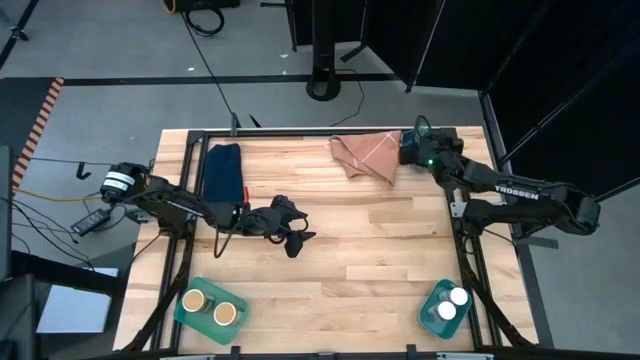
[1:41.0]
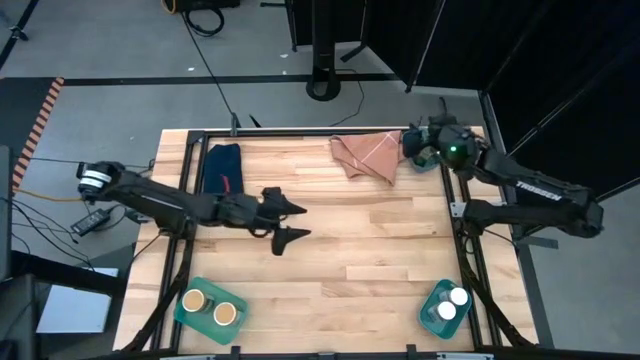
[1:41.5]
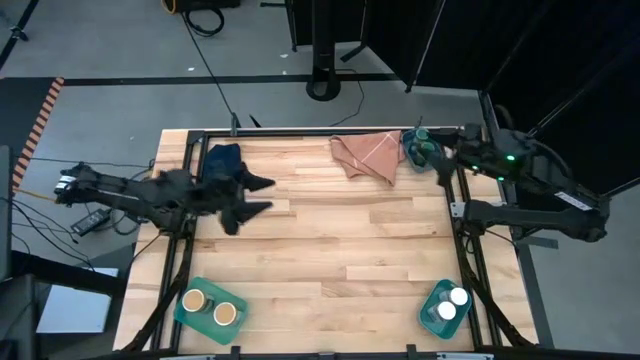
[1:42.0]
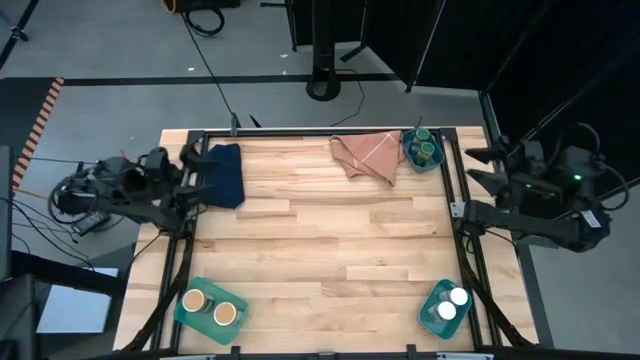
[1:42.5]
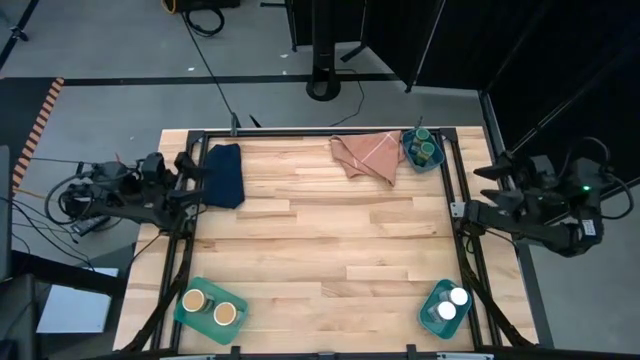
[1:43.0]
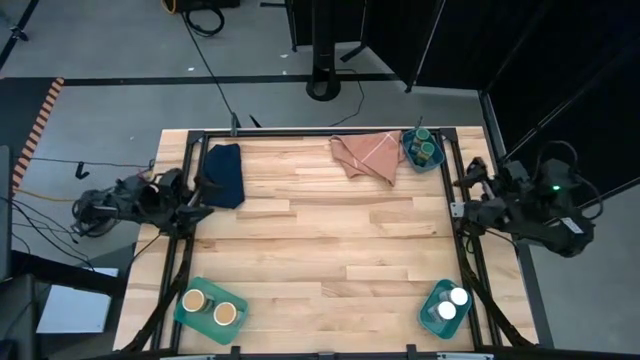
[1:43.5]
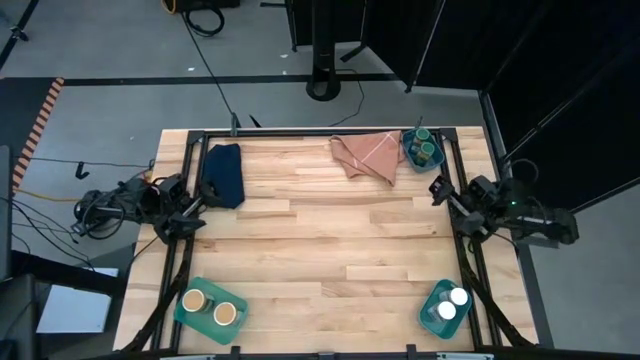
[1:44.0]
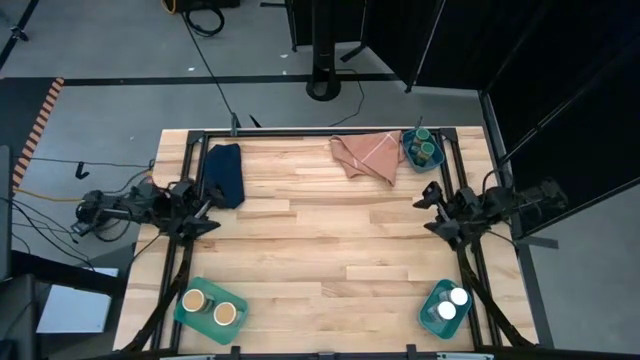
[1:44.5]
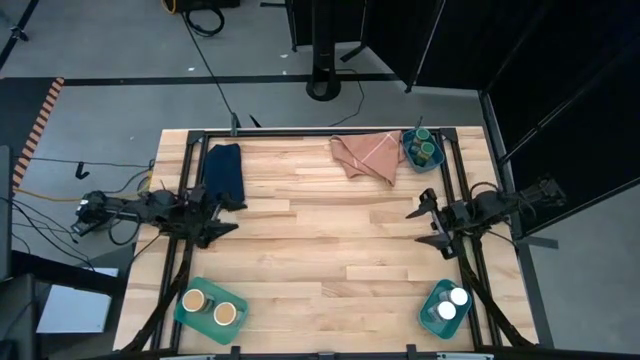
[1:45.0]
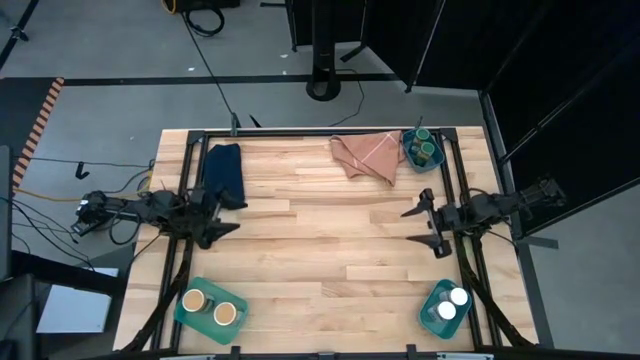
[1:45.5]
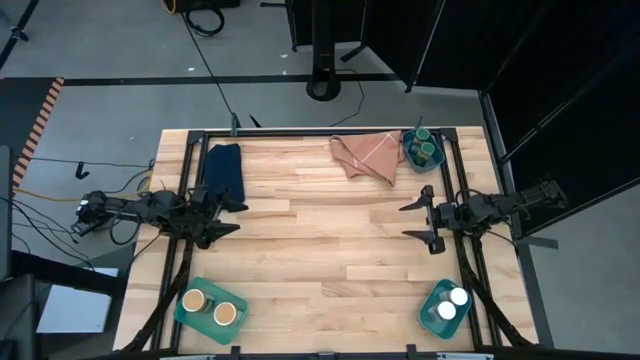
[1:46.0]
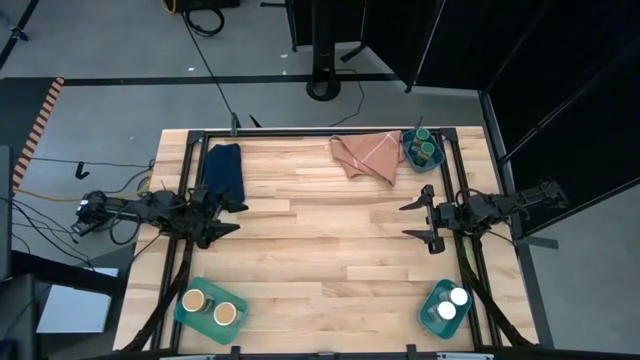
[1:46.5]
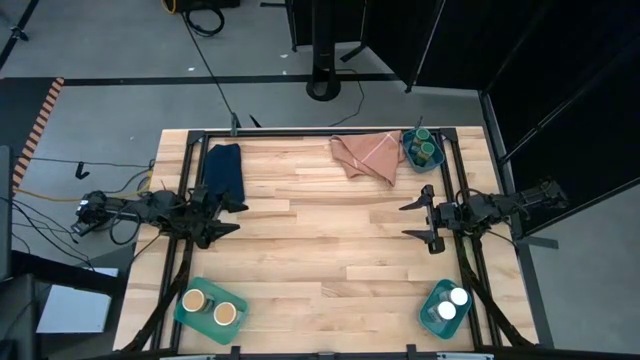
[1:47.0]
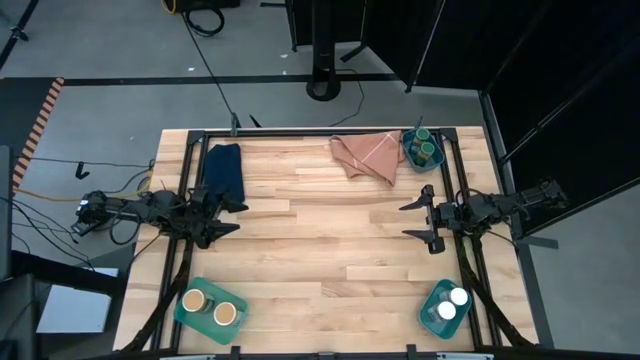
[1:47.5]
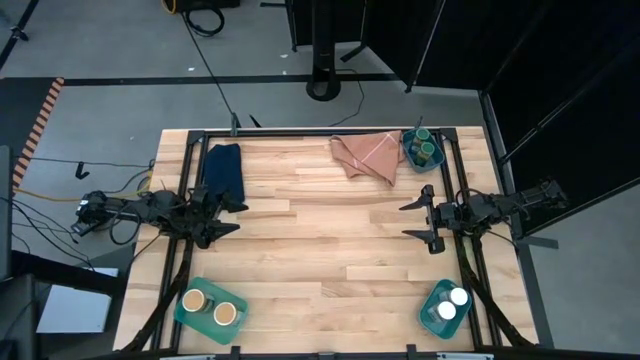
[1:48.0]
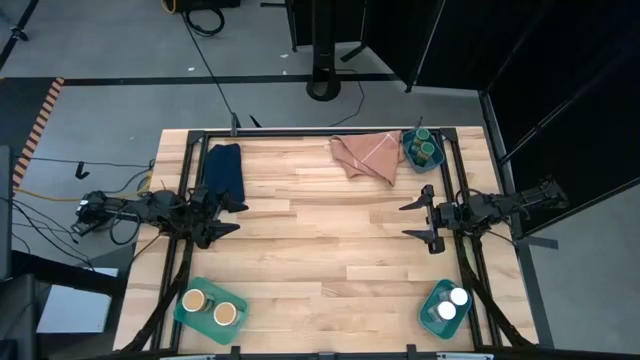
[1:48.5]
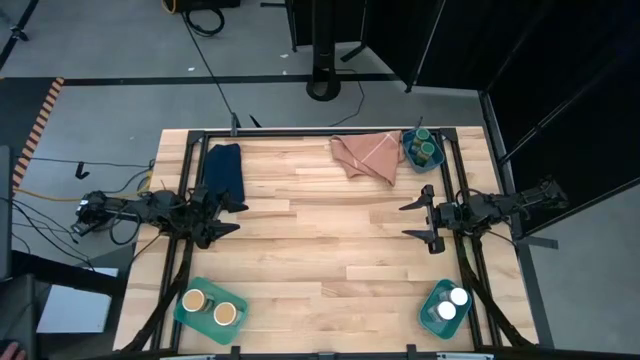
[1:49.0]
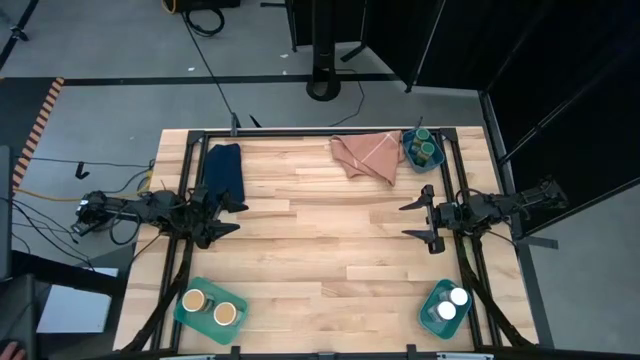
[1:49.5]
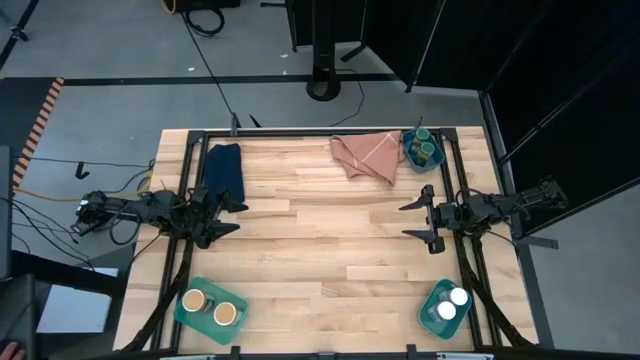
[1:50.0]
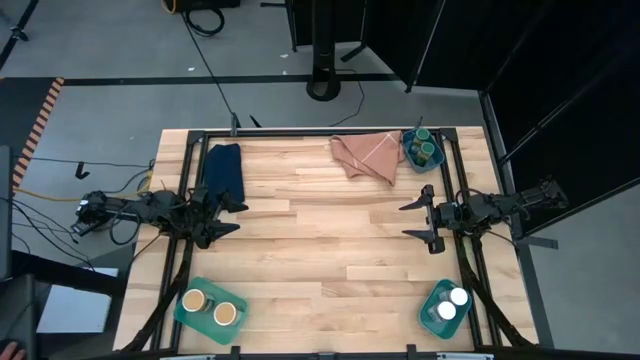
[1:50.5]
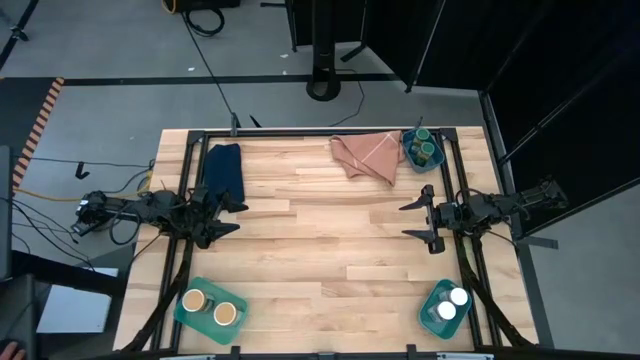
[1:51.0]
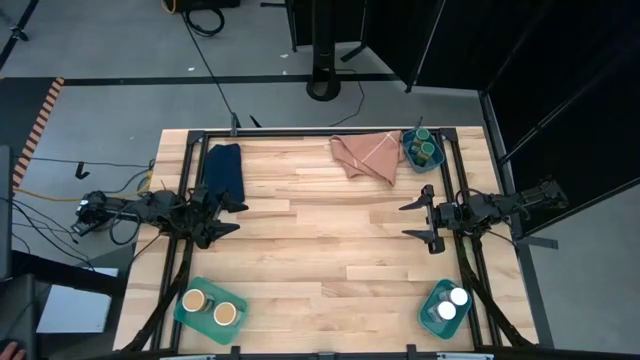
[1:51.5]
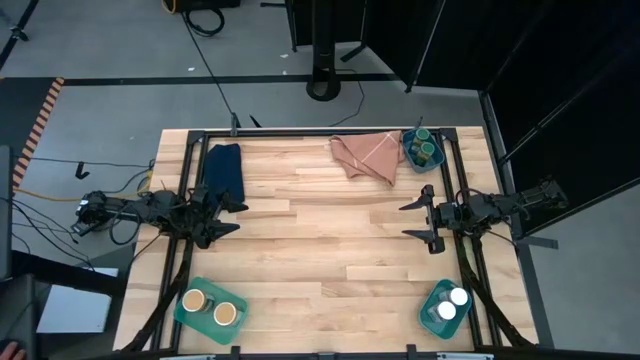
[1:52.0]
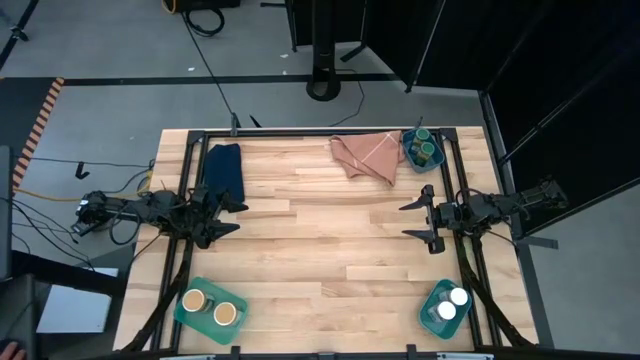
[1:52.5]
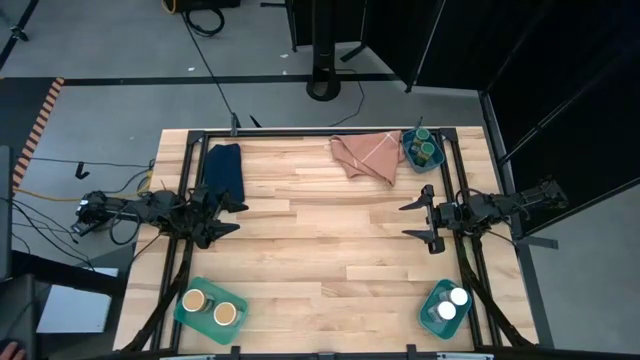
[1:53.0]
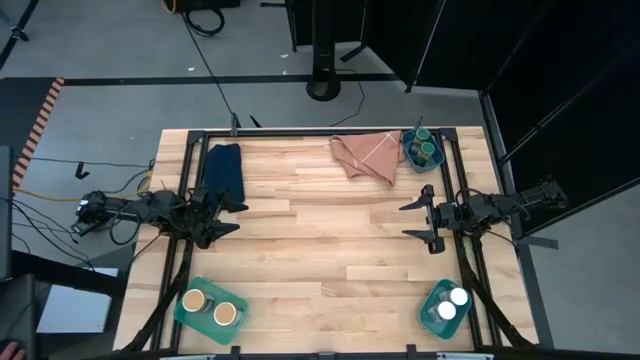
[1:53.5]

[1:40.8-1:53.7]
Task: Sort spices by type
Return to Home Position

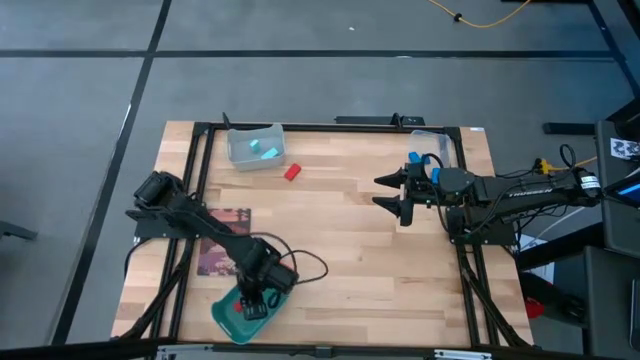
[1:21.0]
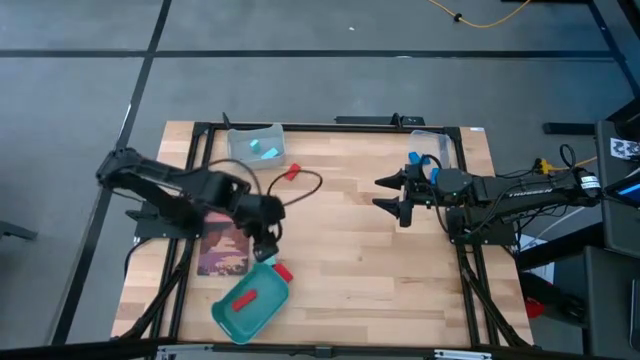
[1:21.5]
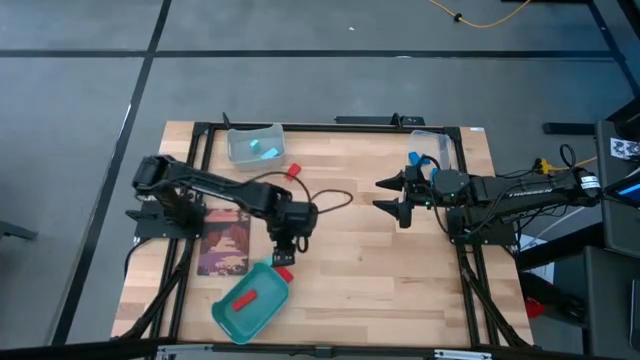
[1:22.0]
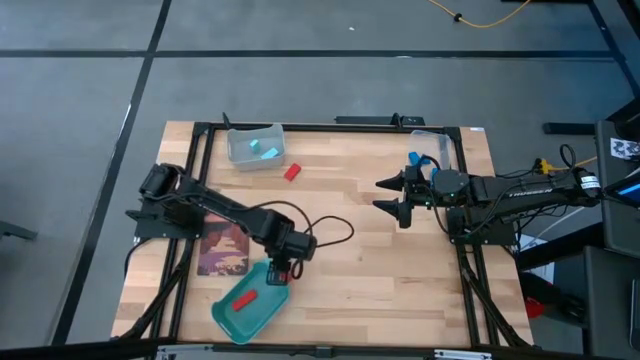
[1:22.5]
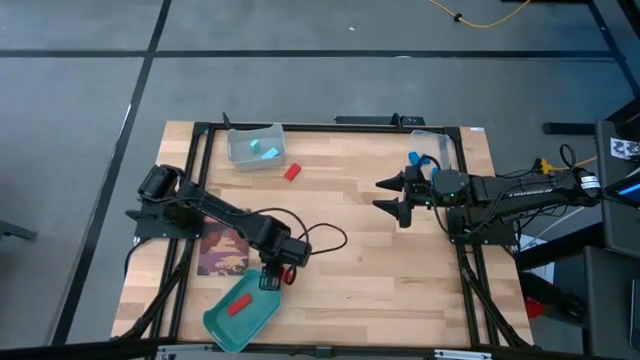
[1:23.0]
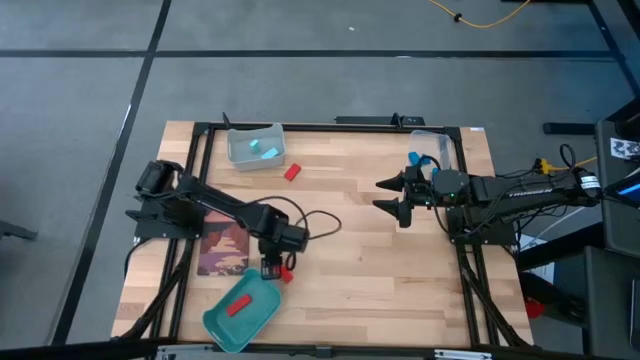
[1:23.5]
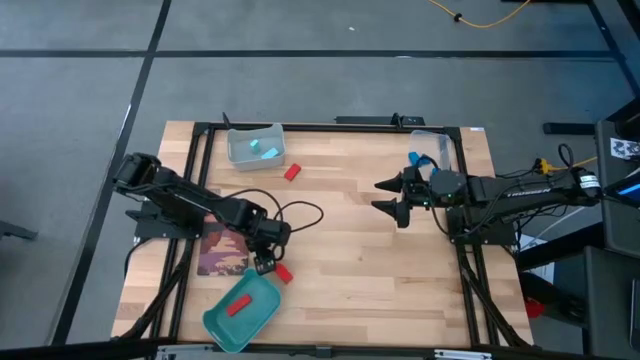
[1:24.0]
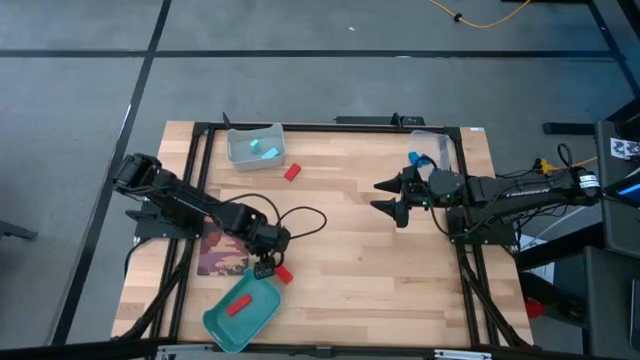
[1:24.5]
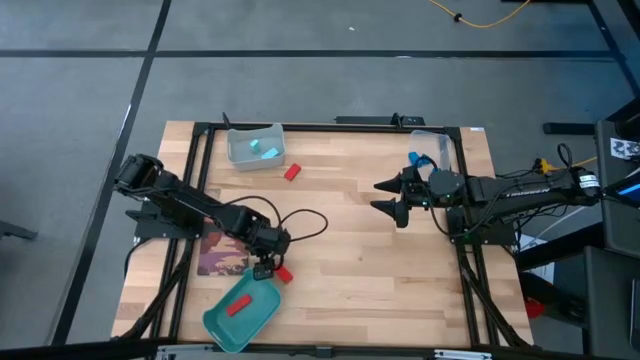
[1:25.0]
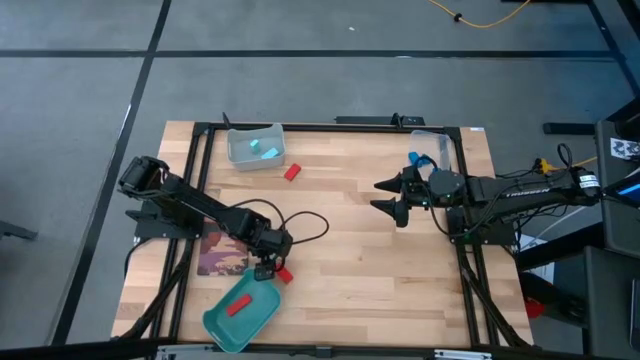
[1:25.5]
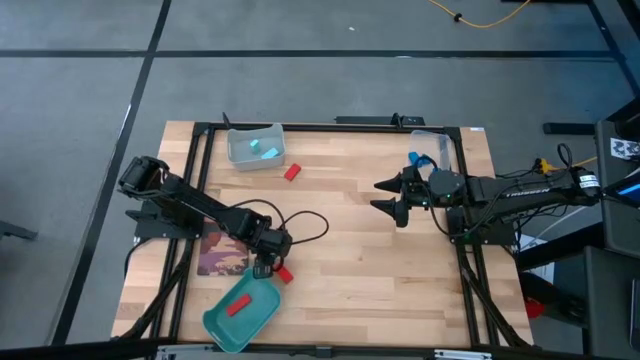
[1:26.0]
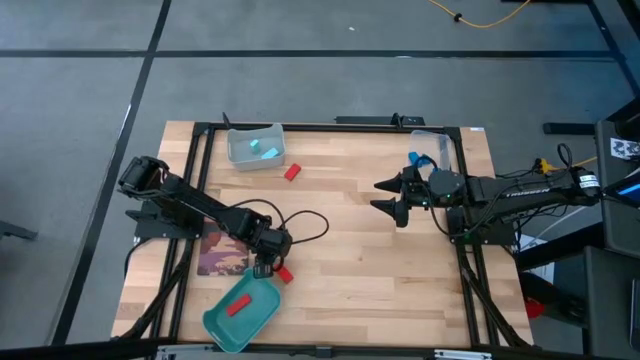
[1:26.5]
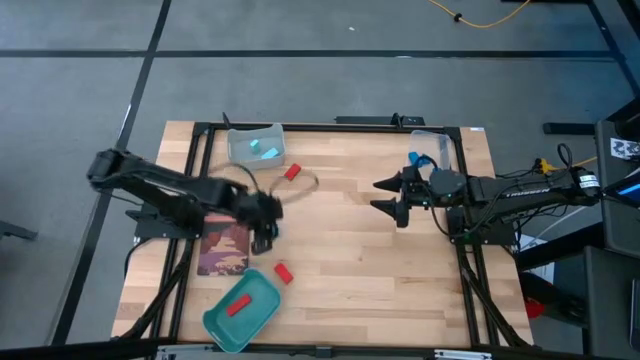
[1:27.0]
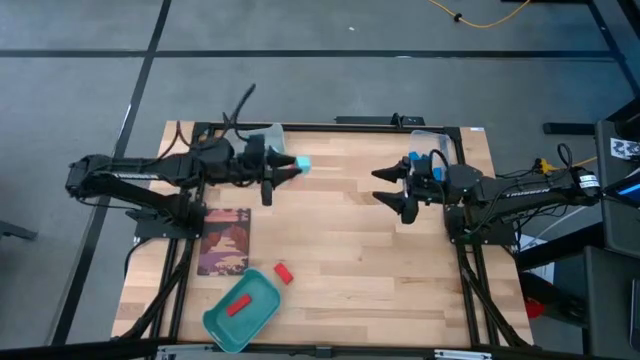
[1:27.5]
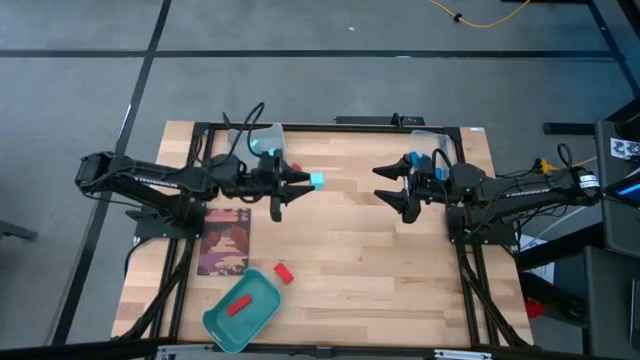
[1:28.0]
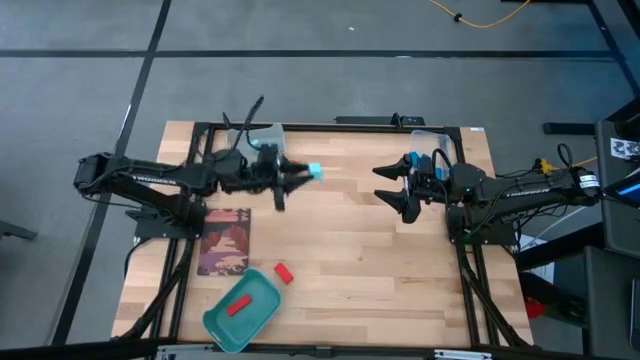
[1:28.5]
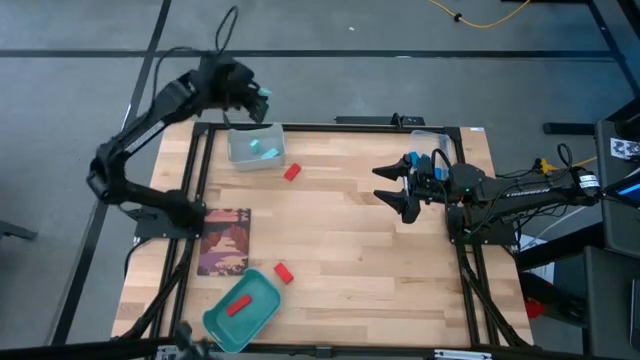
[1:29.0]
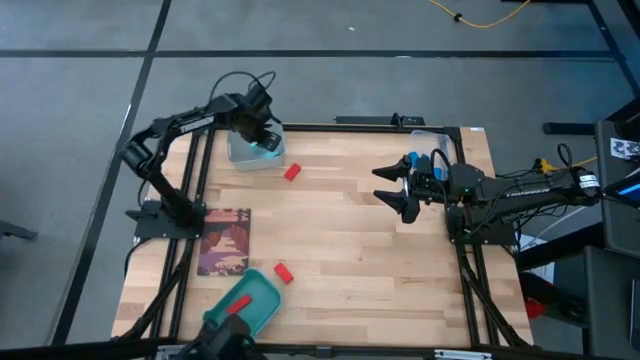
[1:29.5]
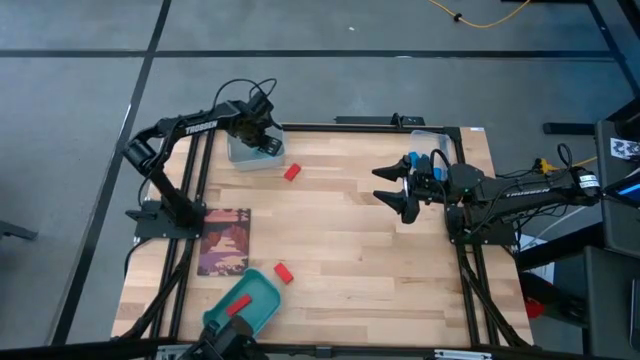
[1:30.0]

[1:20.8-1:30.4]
Task: Sort & place blocks by color
Put the light blue block into the gray bin
